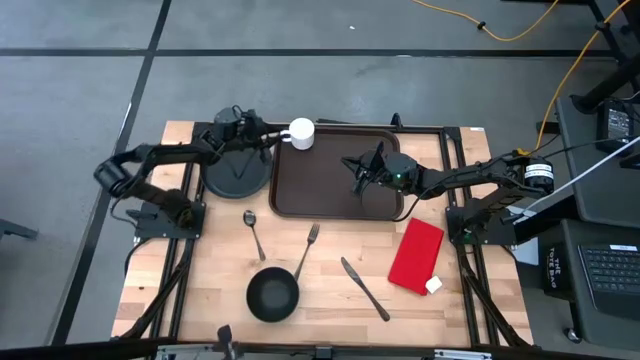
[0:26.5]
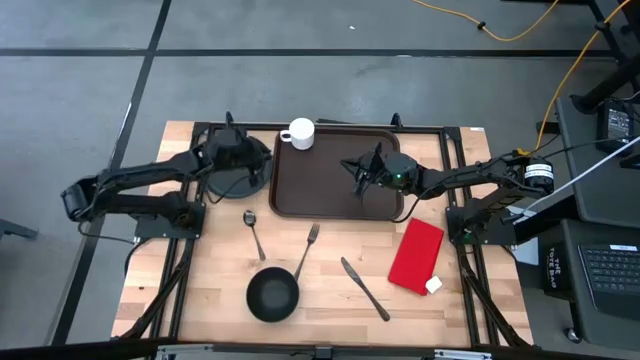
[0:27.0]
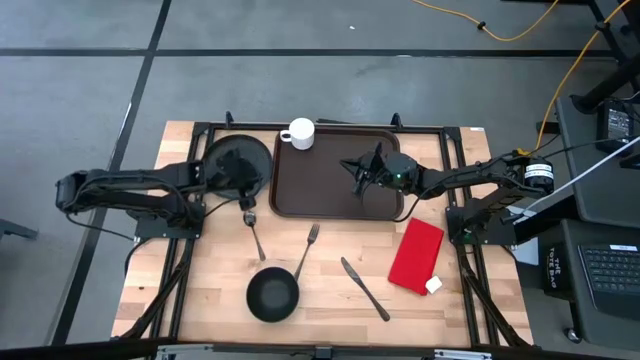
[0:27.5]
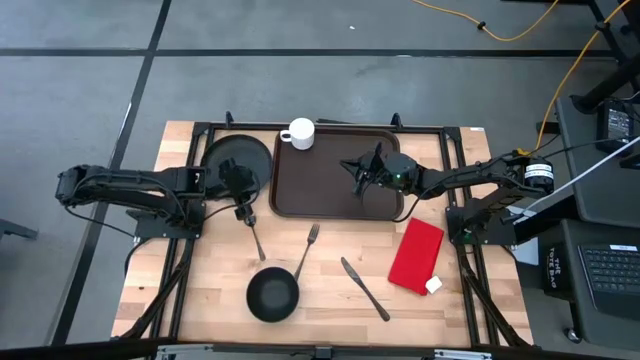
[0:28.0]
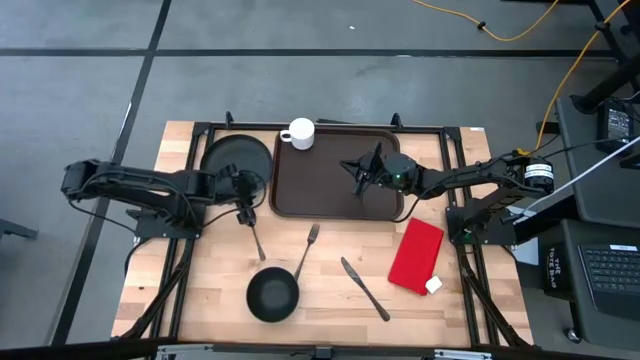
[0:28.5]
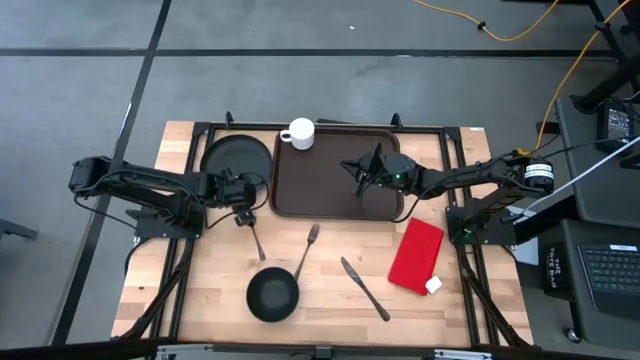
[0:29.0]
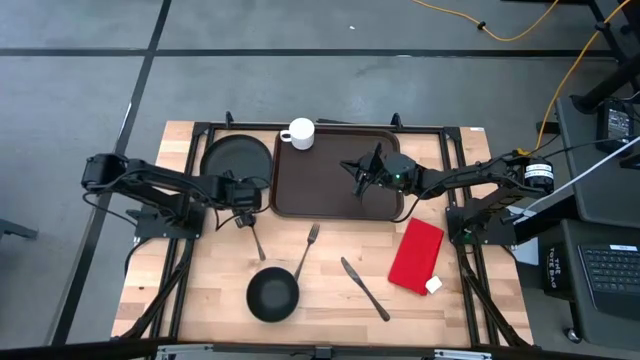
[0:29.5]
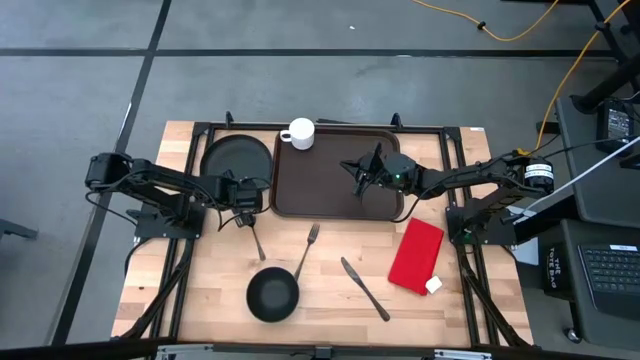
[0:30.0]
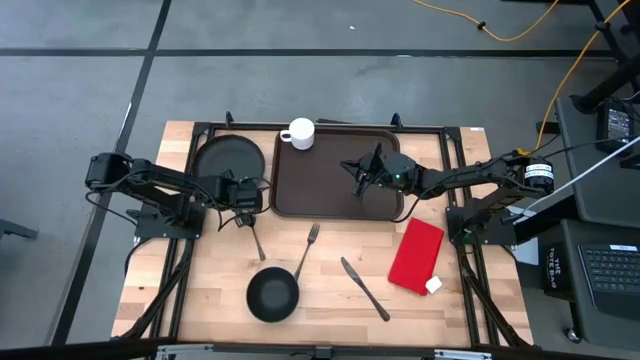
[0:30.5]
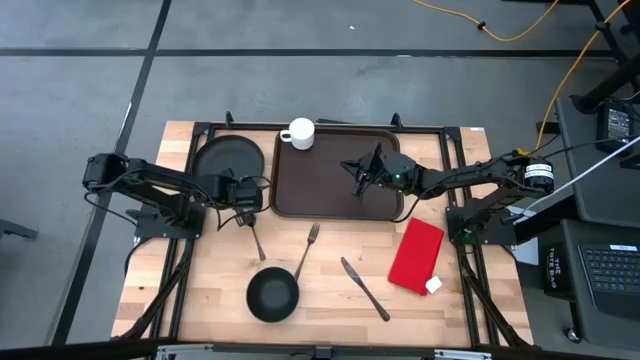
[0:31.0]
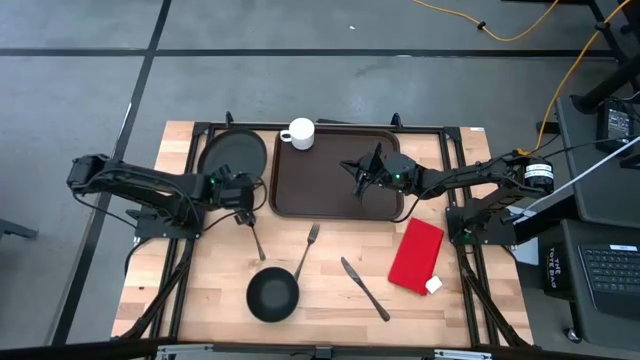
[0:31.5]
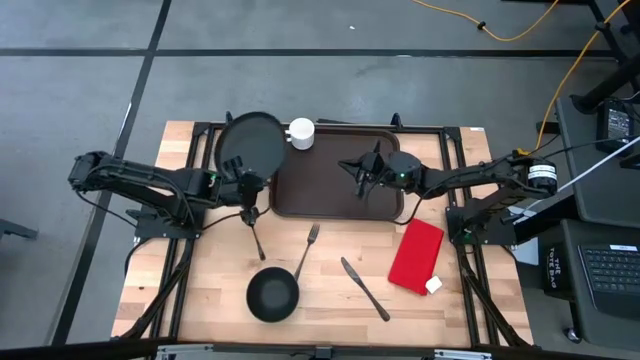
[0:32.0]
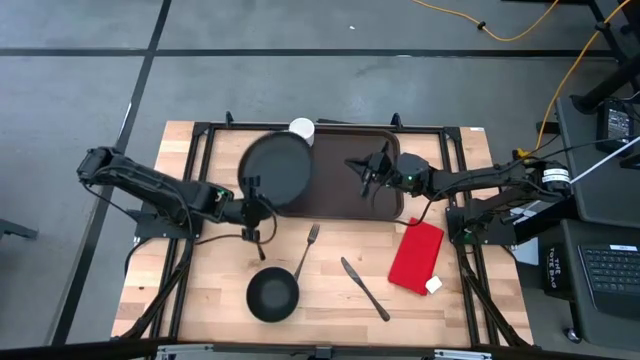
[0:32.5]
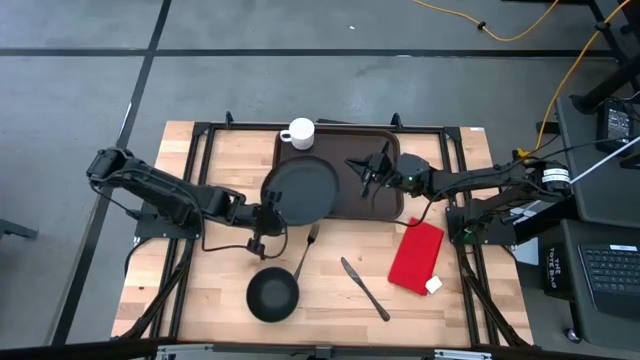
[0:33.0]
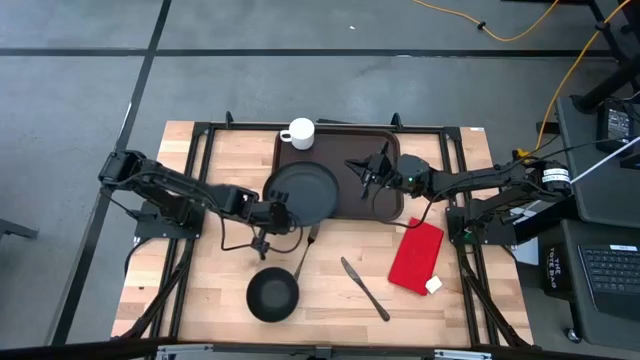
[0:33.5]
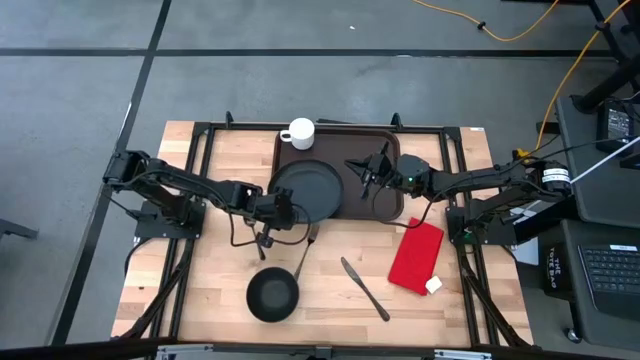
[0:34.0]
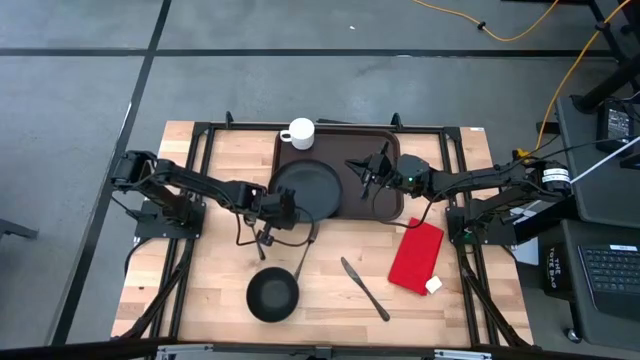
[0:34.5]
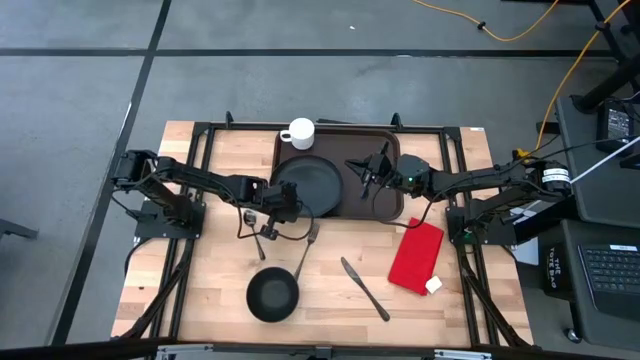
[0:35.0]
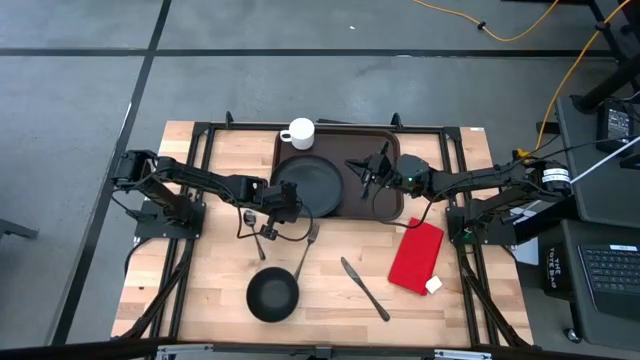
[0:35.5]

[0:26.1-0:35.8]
Task: Set up tray
Put the black plate to the bottom of the white mug on the brown serving tray

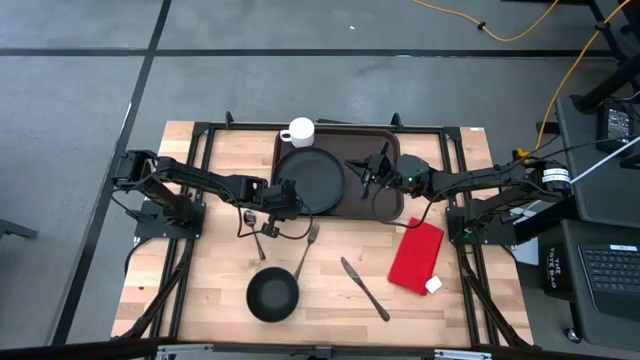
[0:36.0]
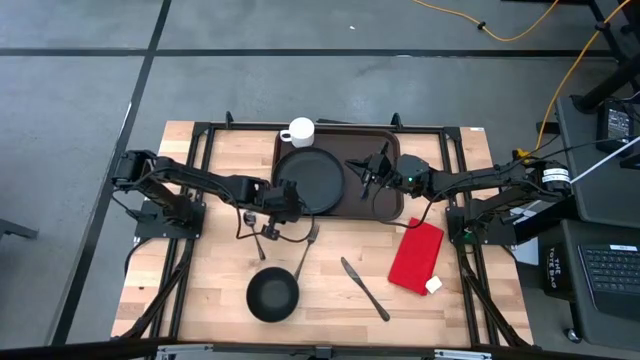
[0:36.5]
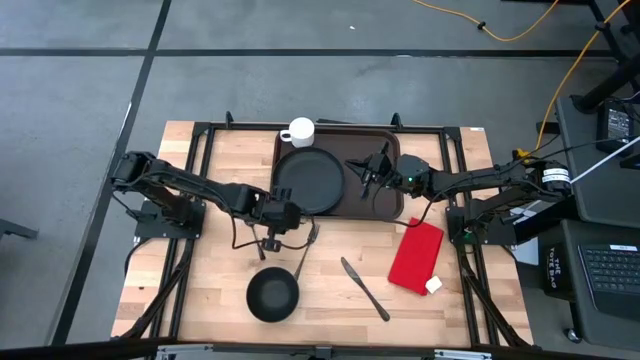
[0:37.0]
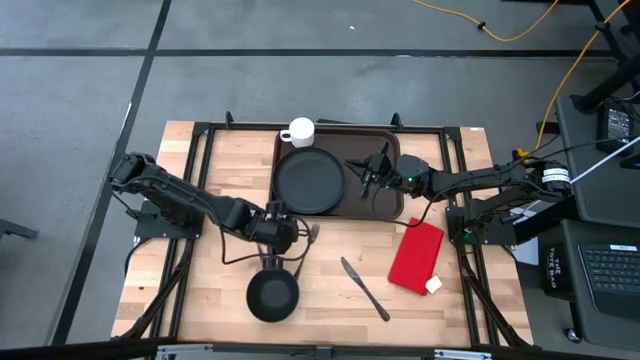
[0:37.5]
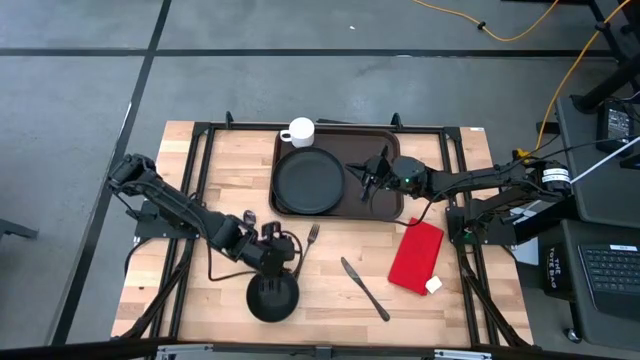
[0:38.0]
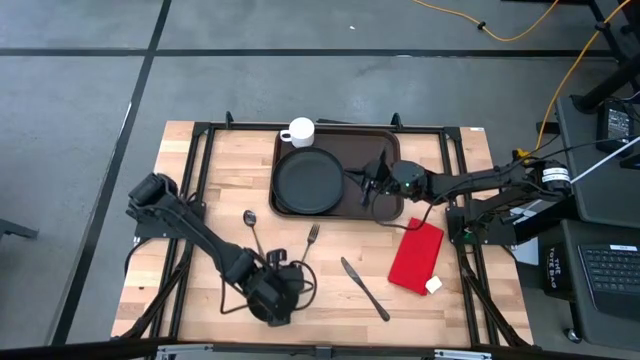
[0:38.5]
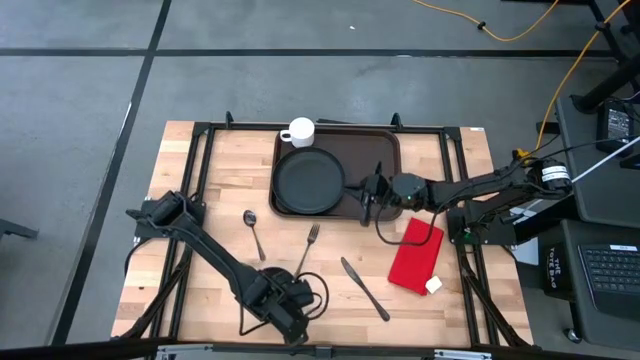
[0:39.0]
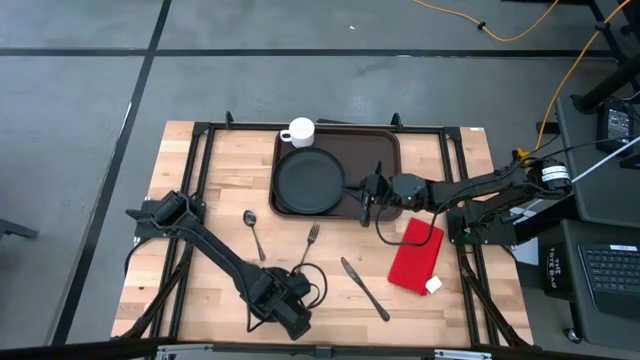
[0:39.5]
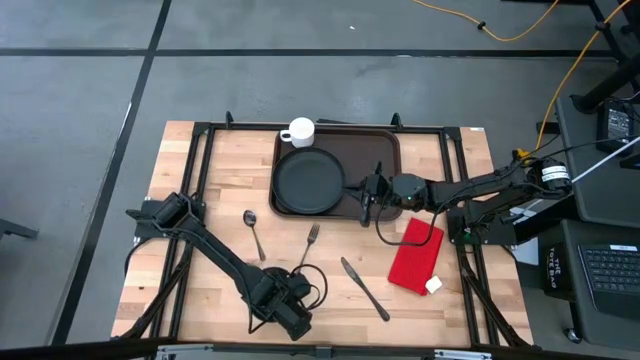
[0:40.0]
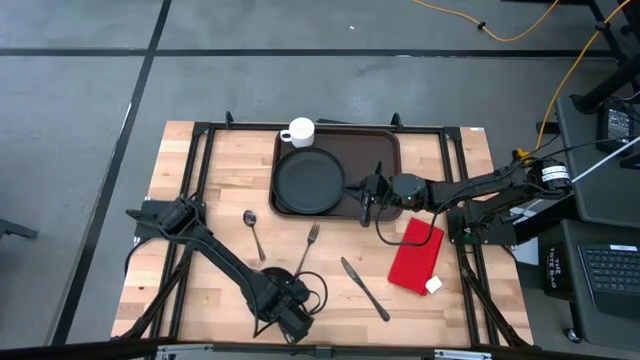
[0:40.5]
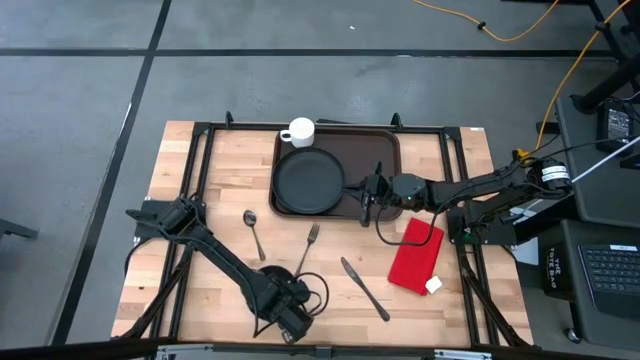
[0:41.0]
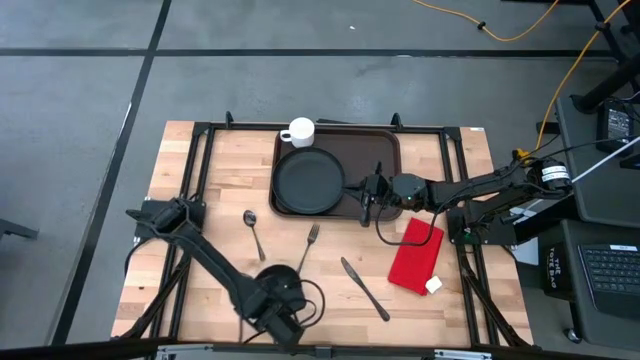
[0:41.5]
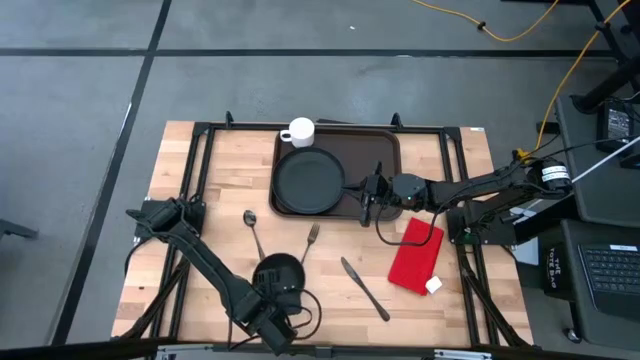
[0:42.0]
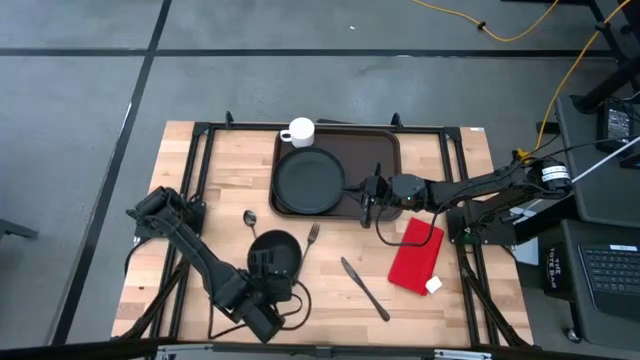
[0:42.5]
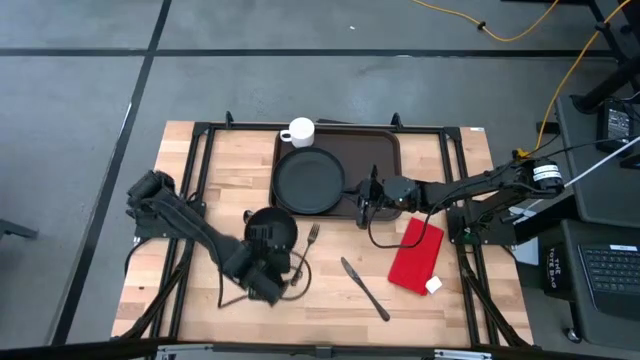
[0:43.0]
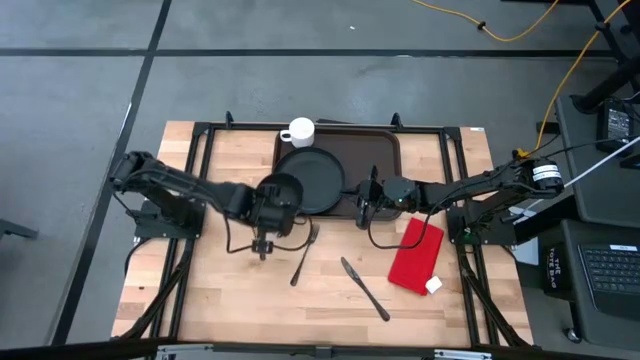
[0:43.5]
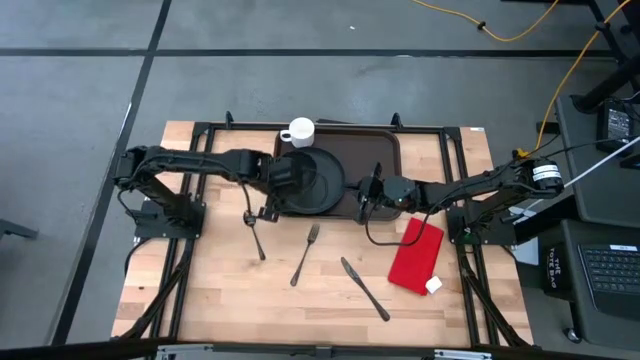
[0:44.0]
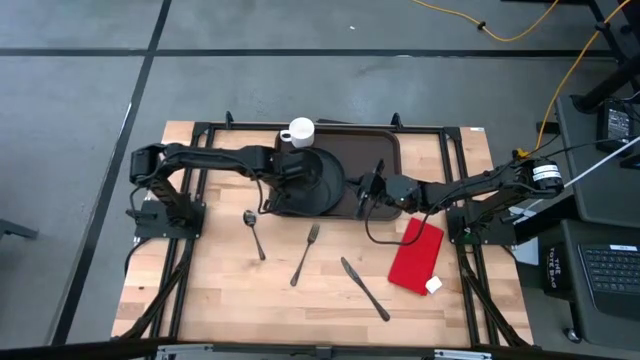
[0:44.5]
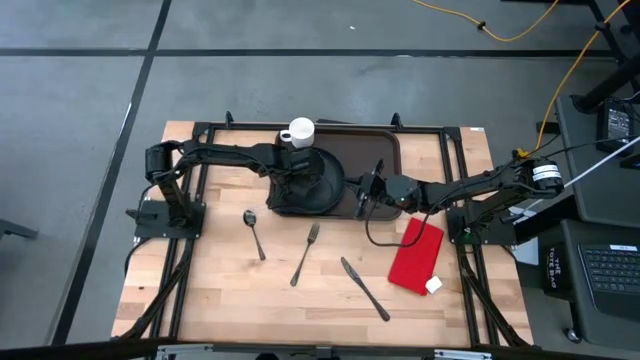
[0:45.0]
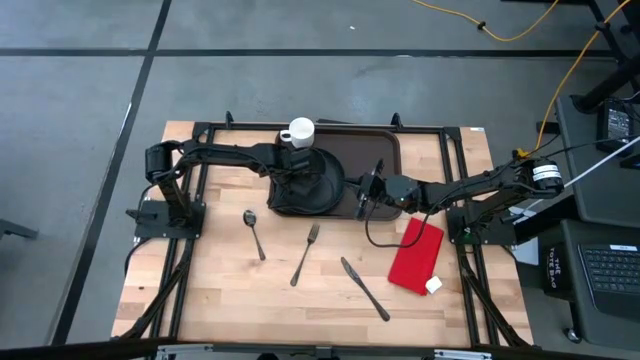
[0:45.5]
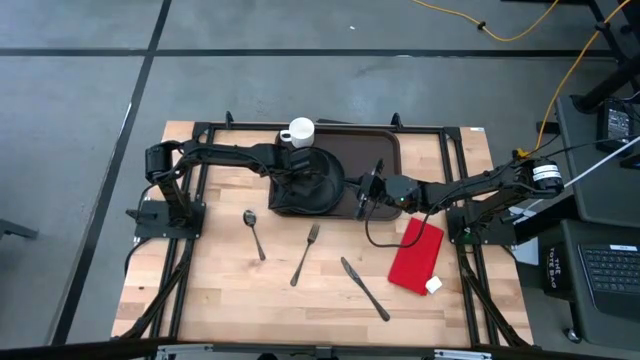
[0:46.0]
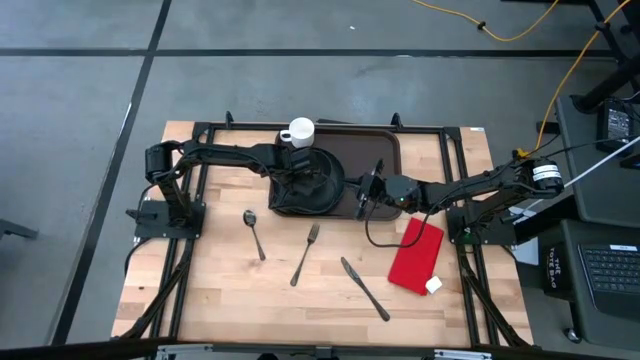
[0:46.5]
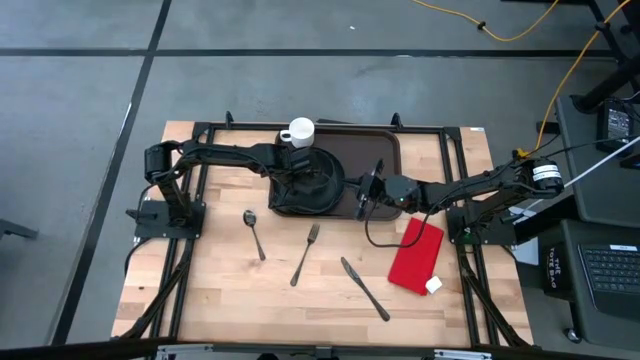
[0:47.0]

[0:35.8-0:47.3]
Put the black bowl on the black plate on the brown serving tray
